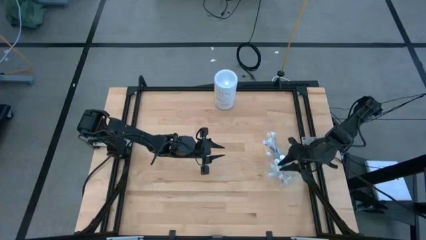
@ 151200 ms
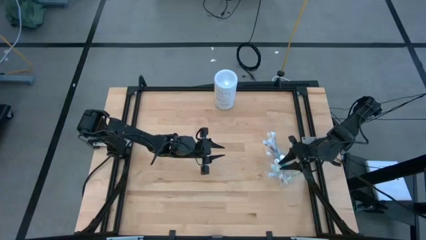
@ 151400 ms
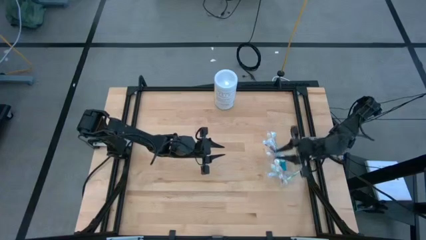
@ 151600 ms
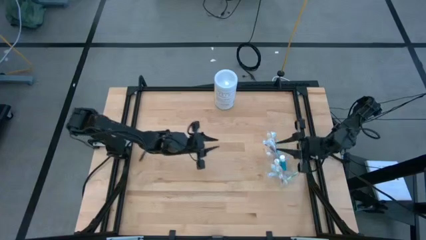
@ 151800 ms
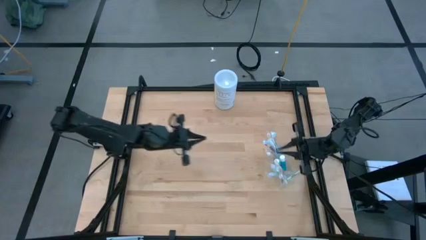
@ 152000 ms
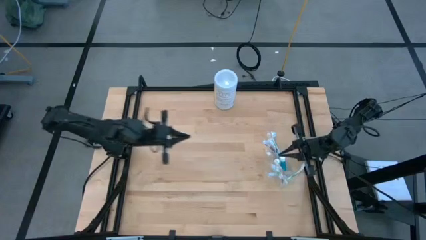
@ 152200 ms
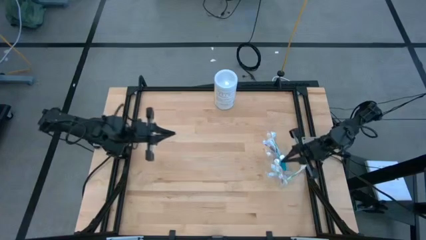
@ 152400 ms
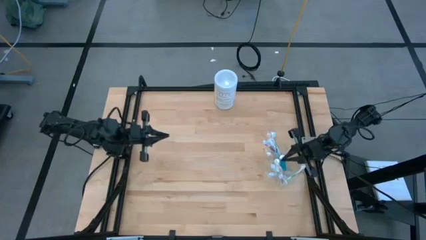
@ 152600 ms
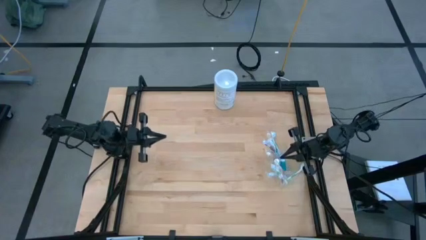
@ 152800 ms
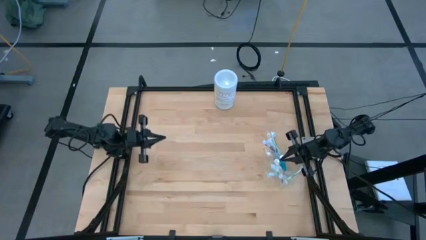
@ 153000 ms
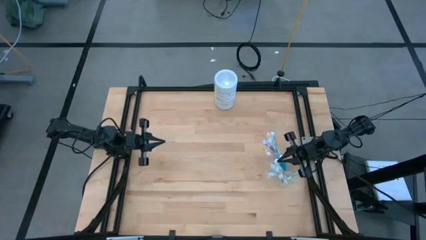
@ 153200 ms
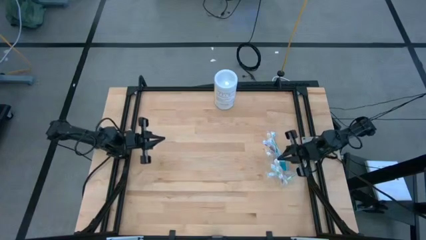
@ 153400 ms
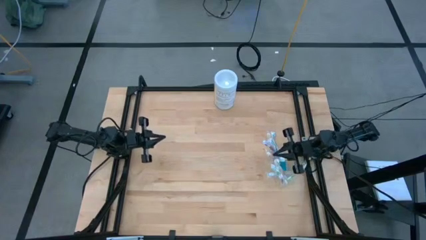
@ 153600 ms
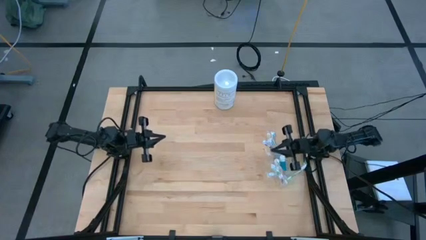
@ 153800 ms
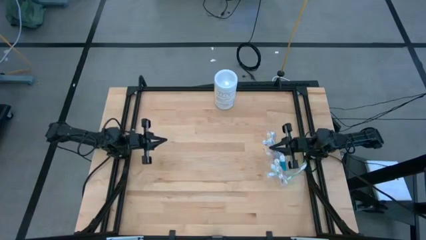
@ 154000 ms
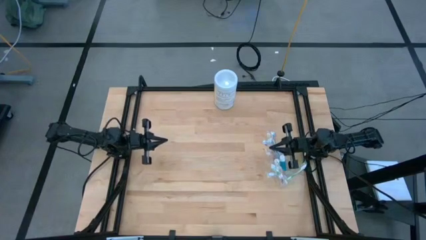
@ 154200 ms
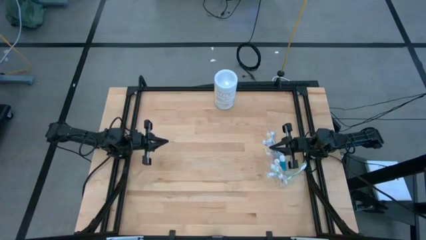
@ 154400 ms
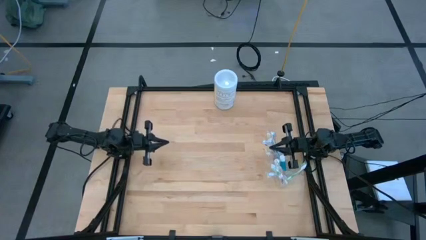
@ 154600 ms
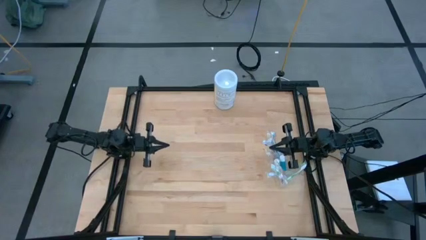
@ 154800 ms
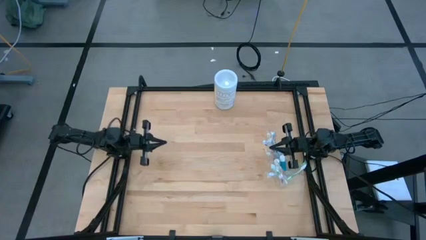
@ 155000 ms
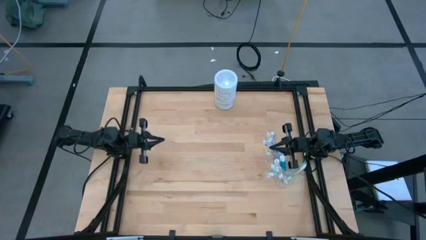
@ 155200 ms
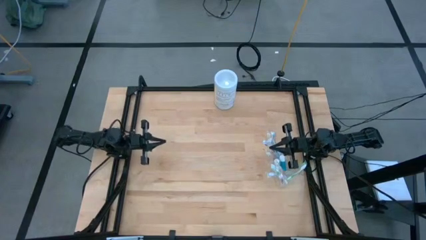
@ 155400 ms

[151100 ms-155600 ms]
Task: Pick & Place toothbrushing station
Return to Home Position

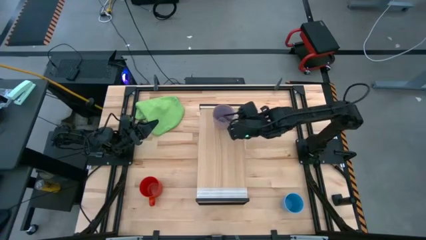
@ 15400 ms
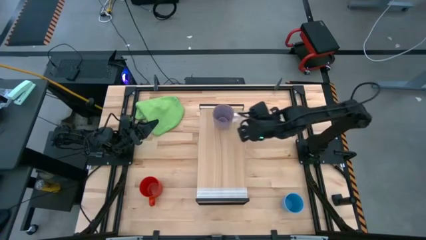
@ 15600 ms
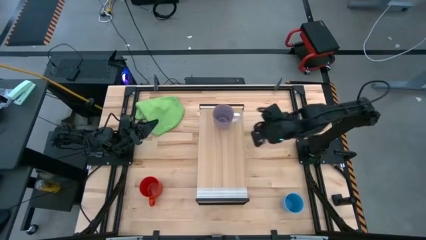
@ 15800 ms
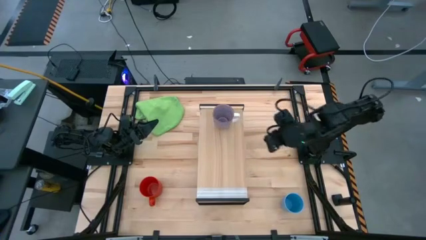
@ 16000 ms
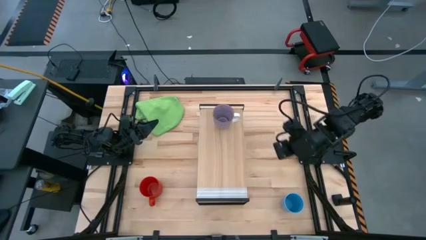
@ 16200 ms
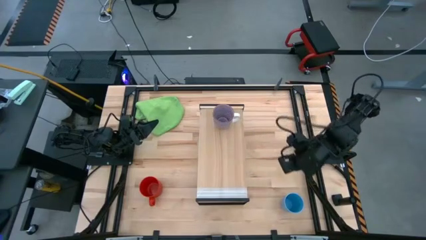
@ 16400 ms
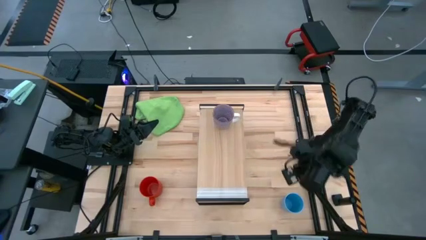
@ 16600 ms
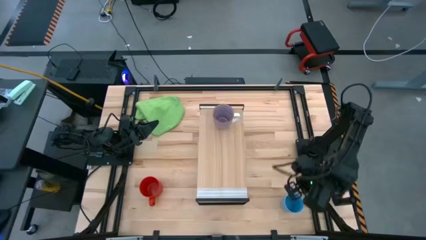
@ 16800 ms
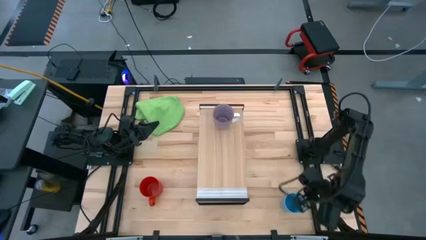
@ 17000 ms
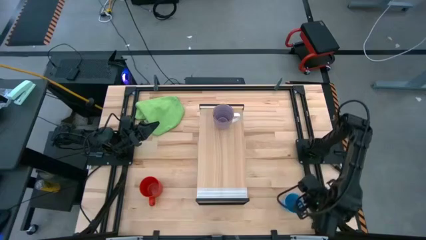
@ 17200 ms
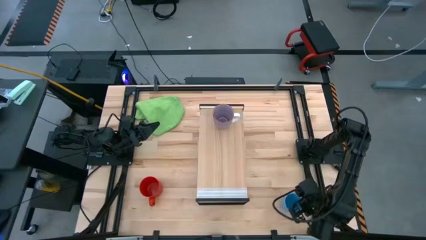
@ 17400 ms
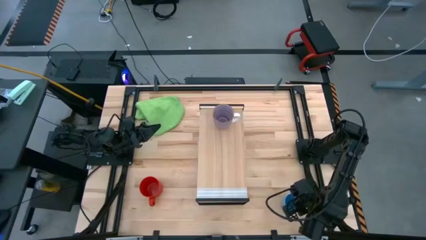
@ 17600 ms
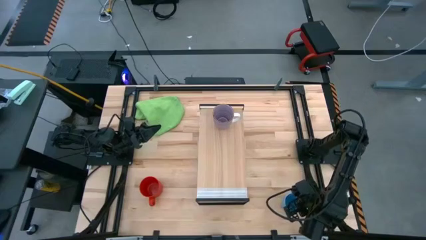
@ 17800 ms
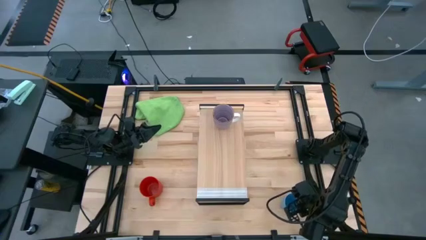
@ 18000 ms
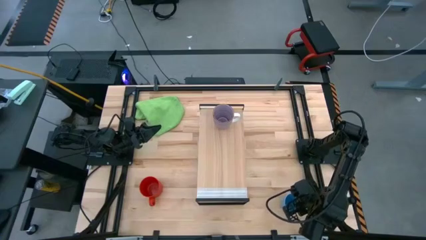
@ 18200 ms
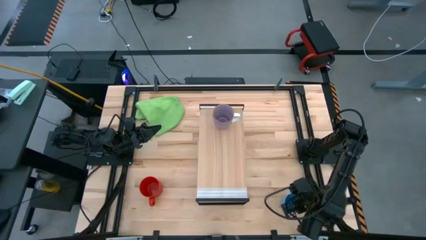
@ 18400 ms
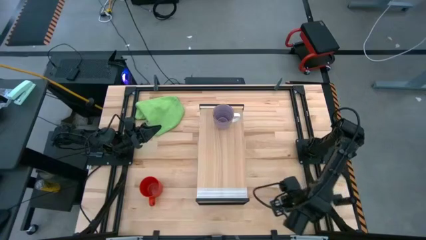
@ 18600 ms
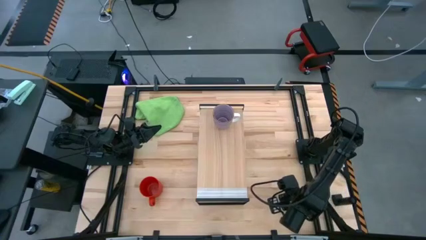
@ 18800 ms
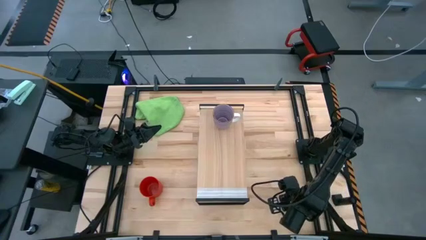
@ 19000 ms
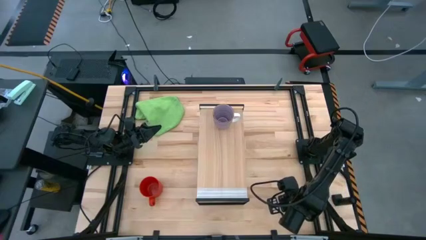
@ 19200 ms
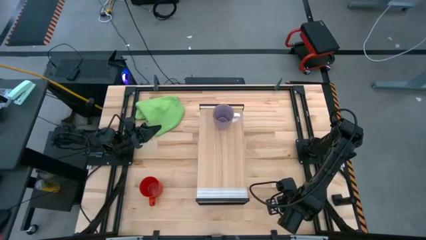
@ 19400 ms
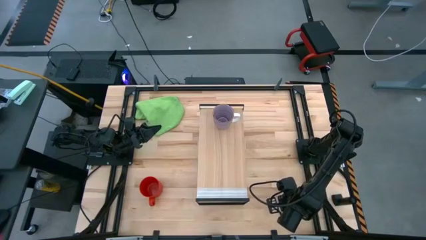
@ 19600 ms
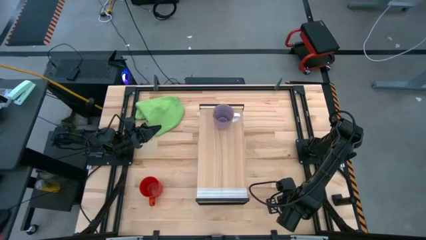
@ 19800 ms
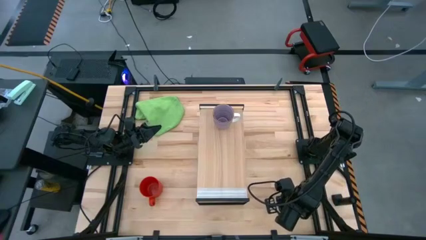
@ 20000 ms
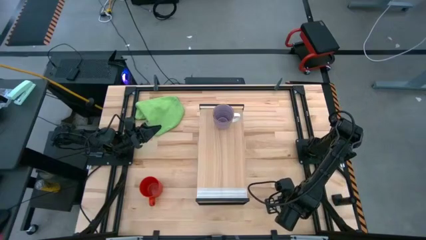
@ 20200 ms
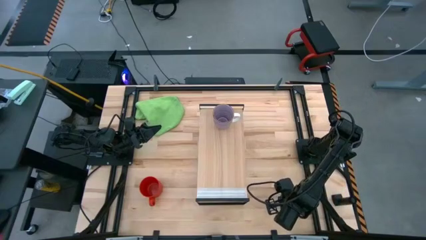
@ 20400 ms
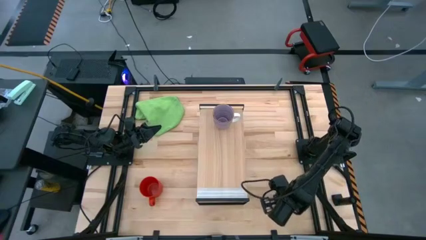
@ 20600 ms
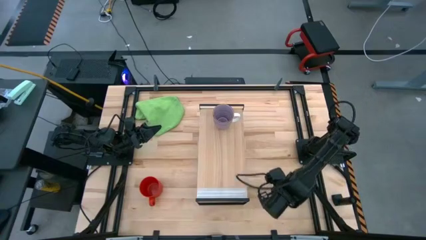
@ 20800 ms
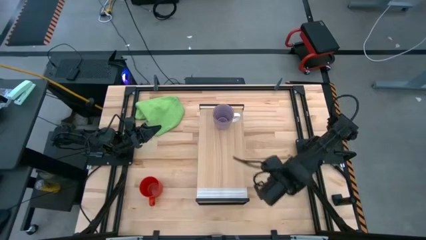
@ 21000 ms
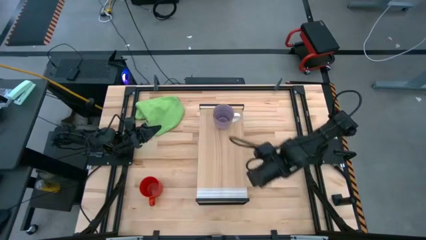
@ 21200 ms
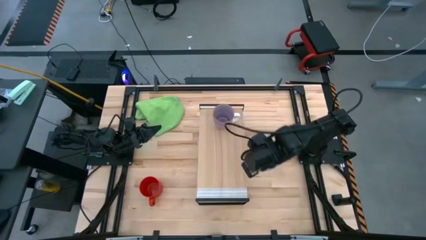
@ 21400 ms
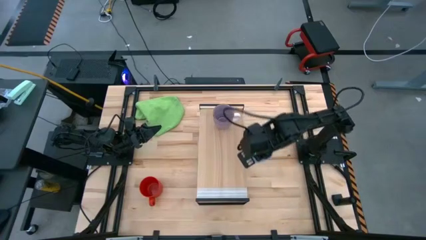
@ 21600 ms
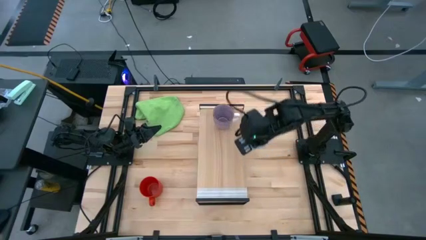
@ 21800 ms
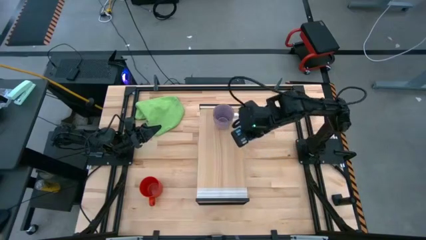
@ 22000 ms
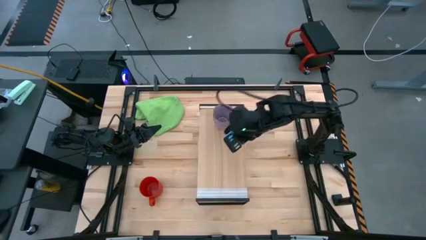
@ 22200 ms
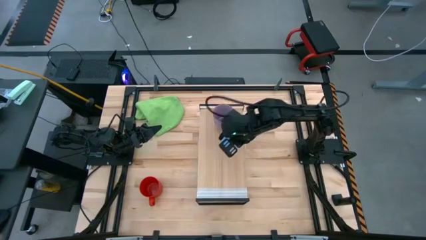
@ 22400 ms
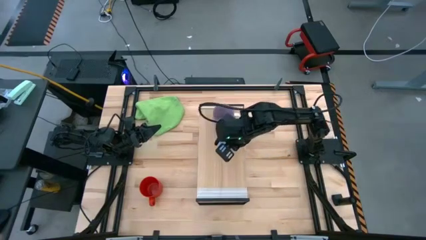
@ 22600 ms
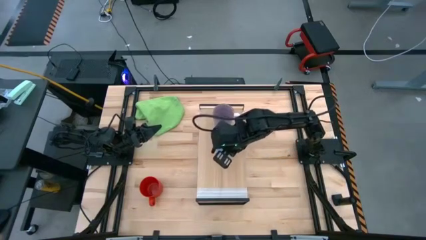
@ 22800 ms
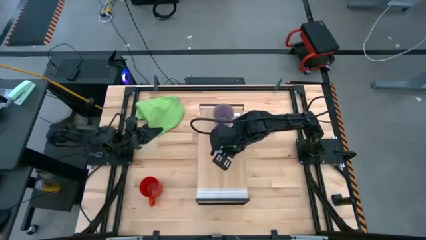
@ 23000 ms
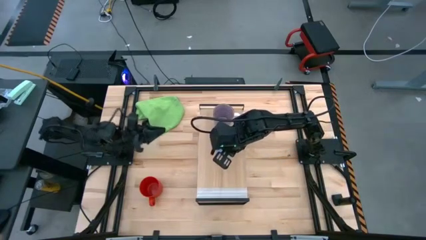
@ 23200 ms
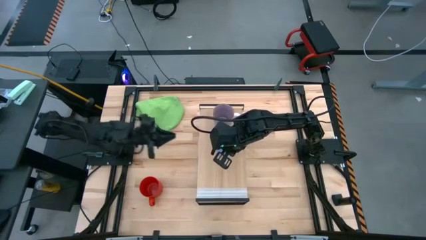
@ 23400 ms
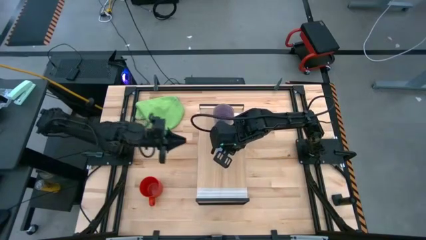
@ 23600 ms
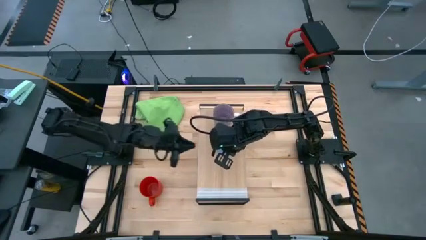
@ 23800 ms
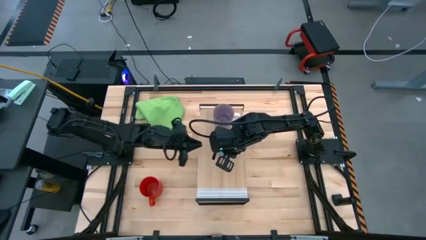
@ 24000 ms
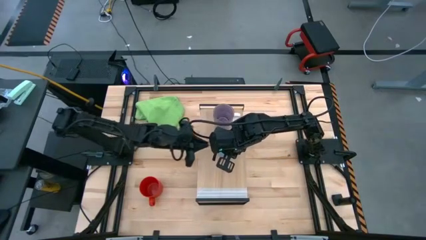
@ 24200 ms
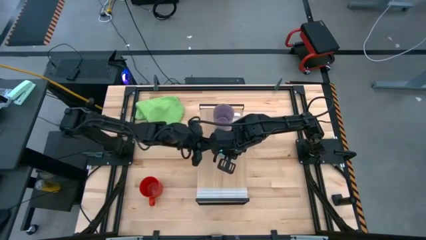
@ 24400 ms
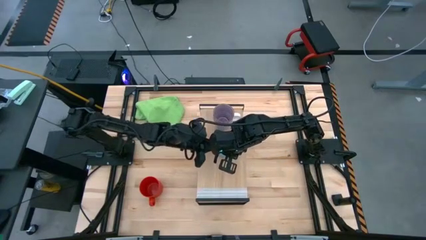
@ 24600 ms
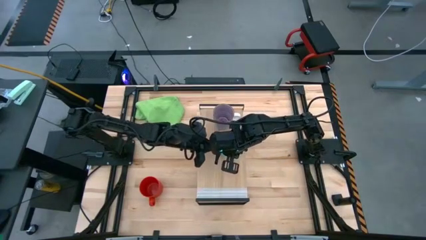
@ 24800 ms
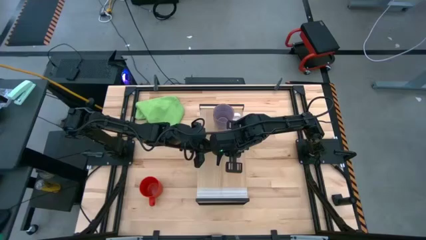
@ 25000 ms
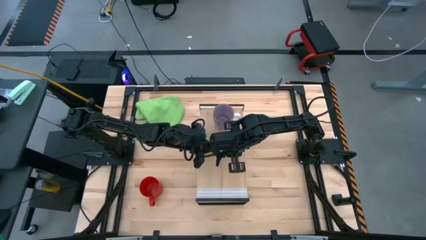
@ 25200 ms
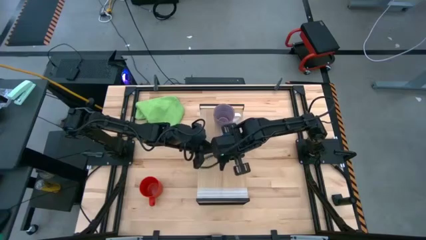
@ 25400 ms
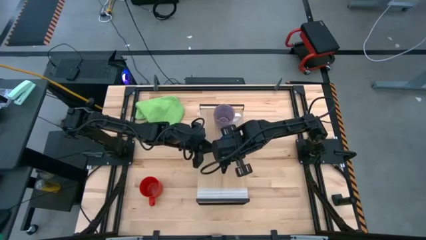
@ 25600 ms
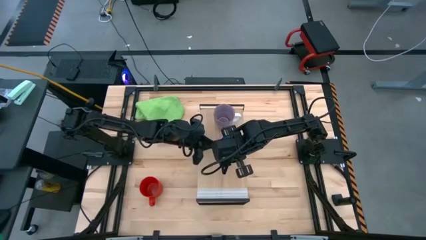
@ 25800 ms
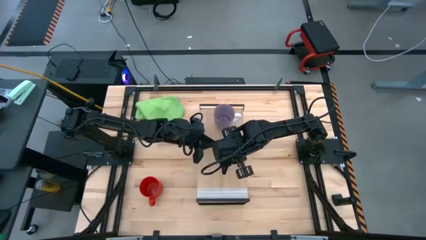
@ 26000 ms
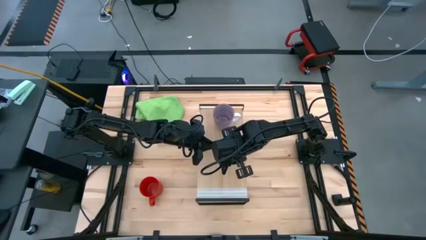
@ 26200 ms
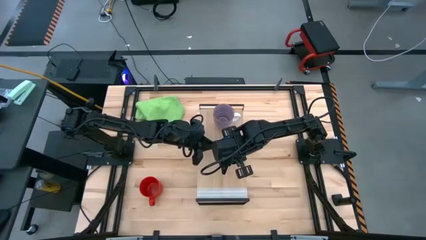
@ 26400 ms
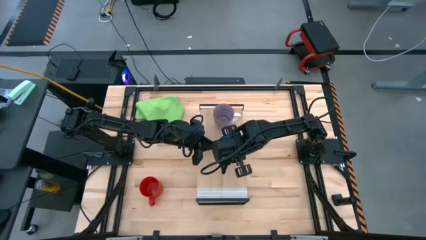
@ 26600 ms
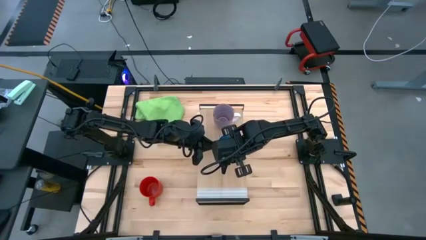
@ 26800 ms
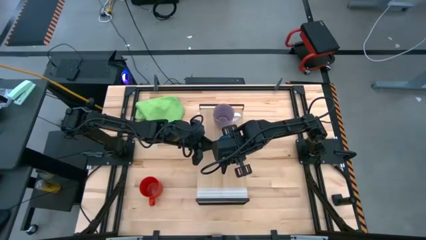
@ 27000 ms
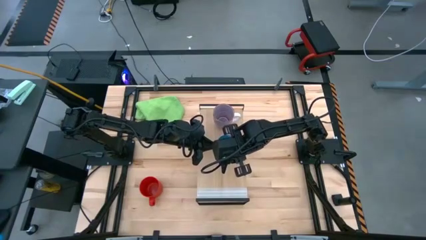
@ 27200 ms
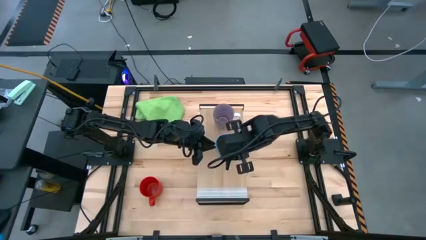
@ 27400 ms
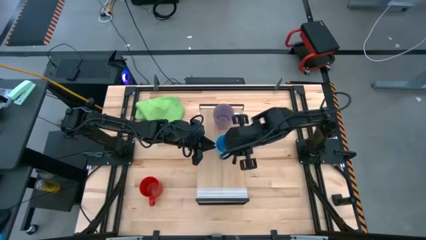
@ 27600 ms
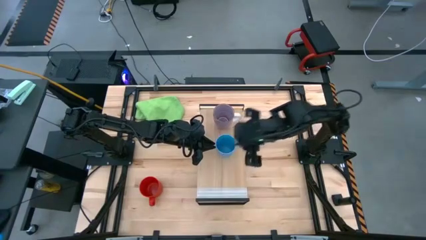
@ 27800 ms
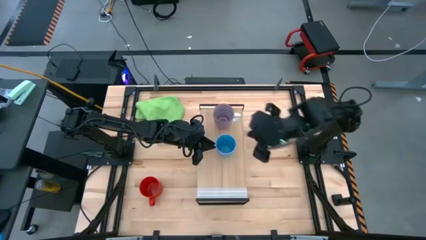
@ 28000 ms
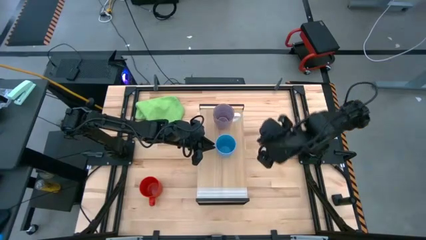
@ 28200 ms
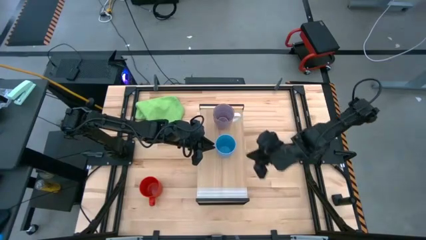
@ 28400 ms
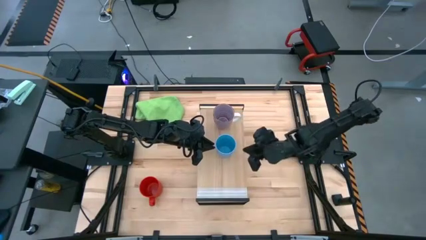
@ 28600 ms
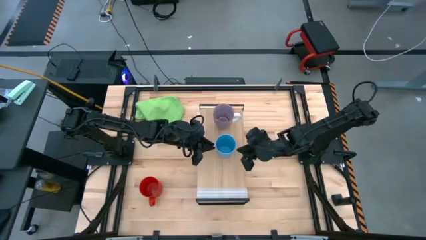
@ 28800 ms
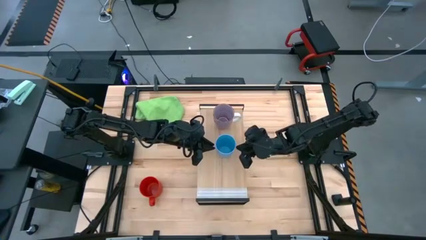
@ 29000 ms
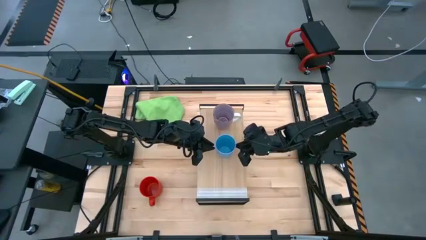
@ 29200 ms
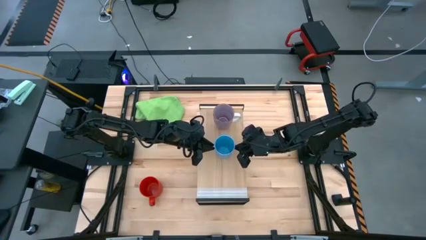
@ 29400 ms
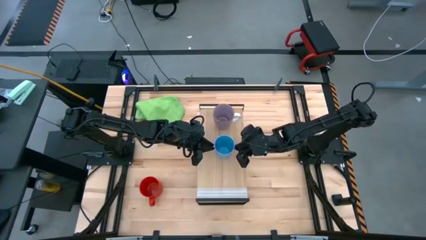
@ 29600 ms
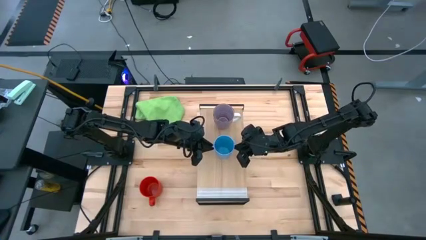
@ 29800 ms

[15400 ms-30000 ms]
Task: Stack small to large cups/mugs on shelf
Put the blue cup on the shelf
